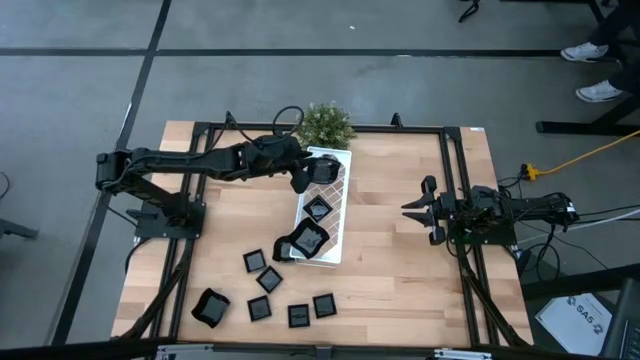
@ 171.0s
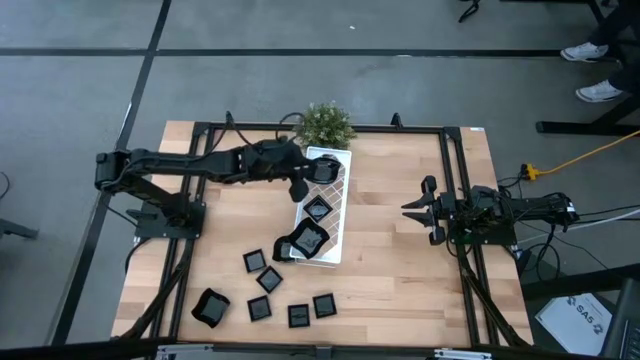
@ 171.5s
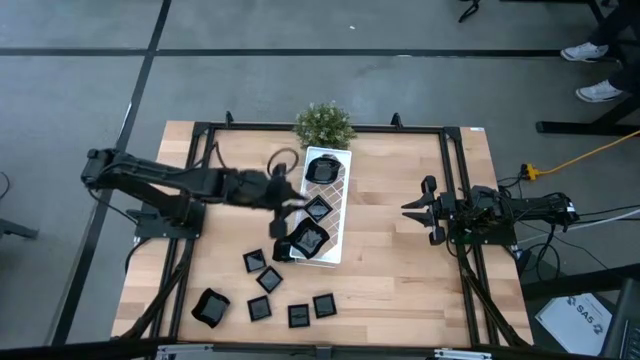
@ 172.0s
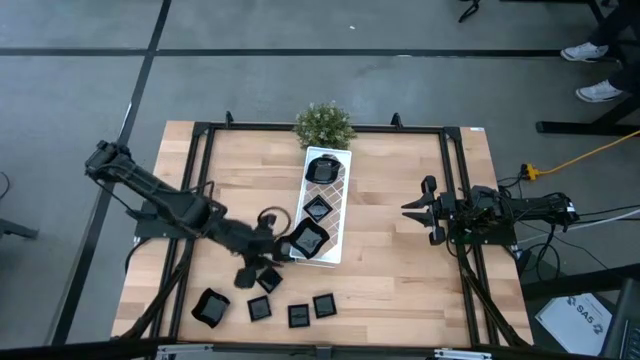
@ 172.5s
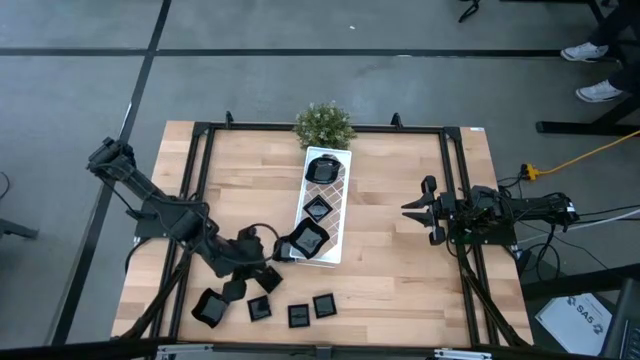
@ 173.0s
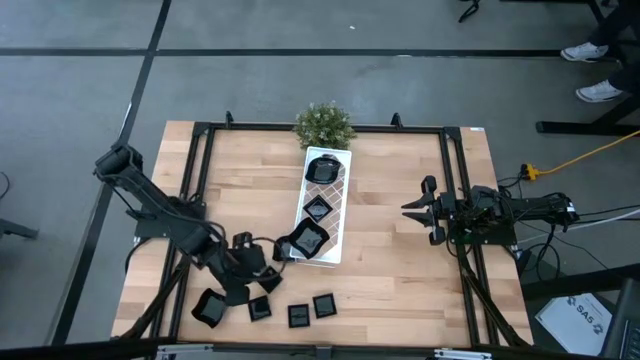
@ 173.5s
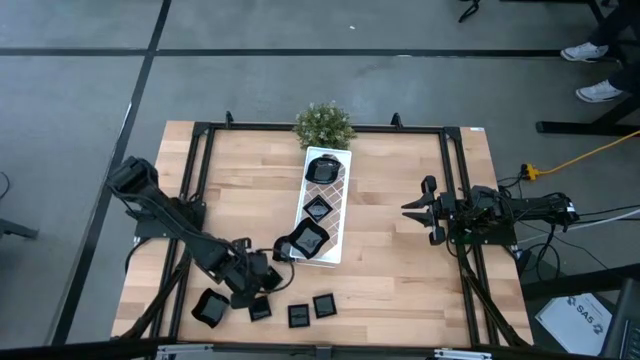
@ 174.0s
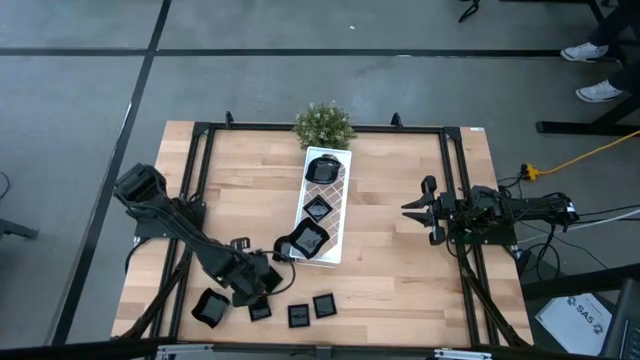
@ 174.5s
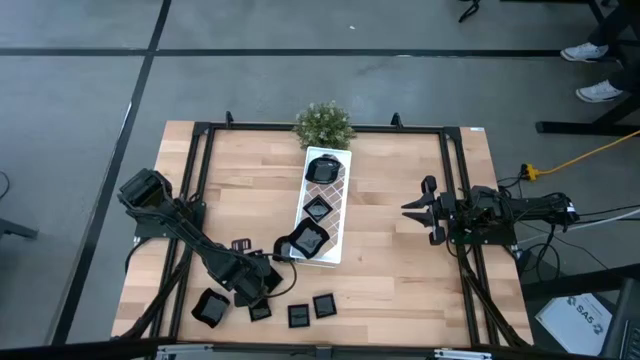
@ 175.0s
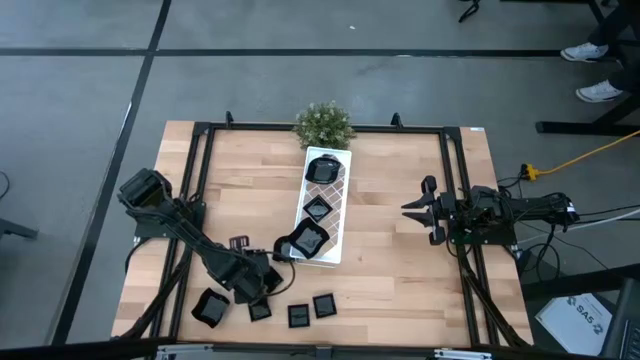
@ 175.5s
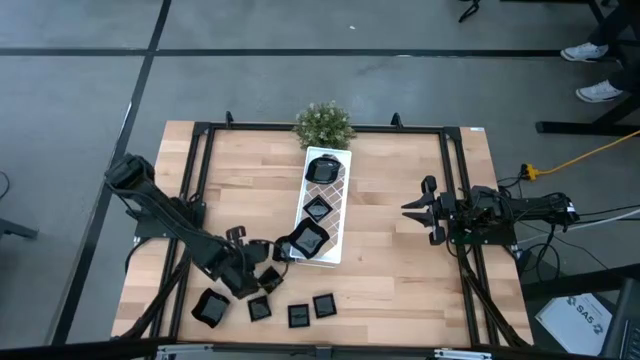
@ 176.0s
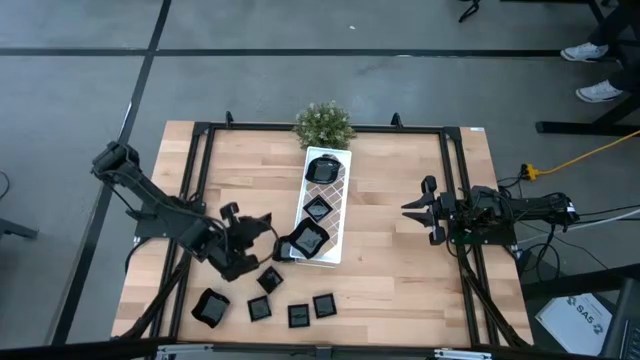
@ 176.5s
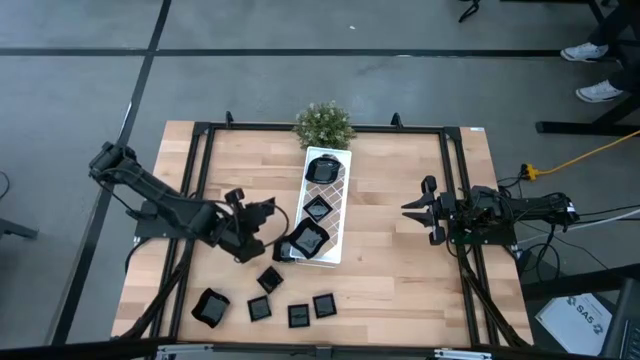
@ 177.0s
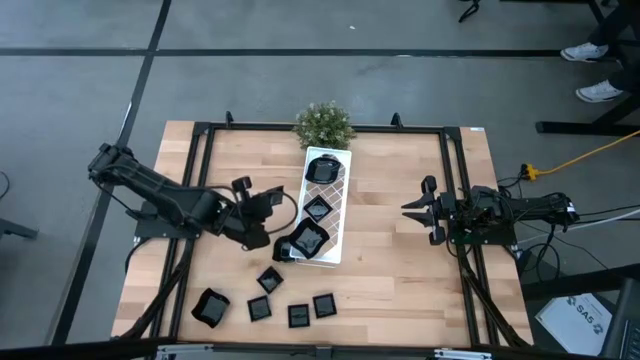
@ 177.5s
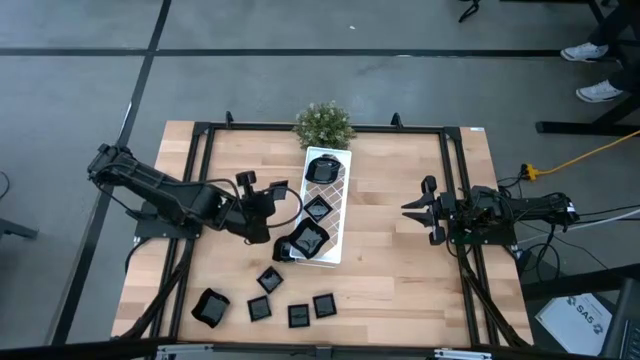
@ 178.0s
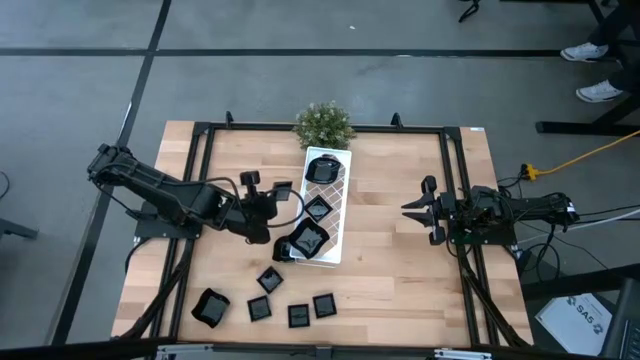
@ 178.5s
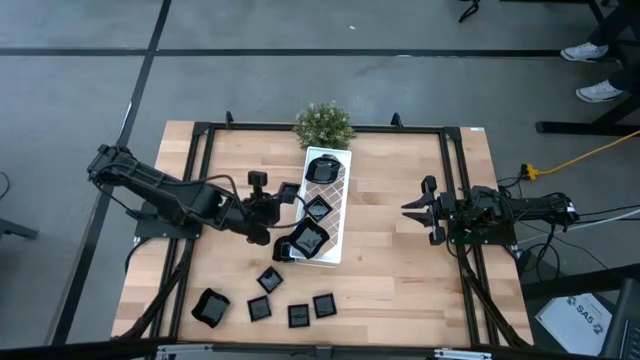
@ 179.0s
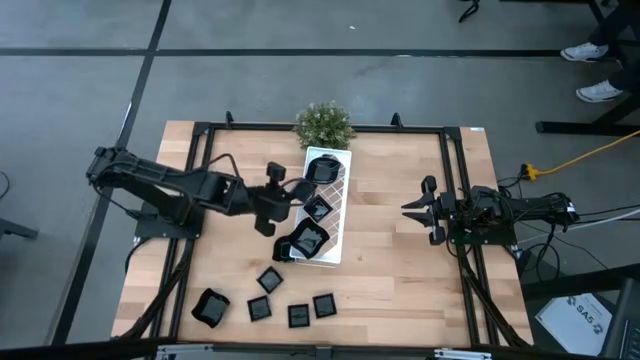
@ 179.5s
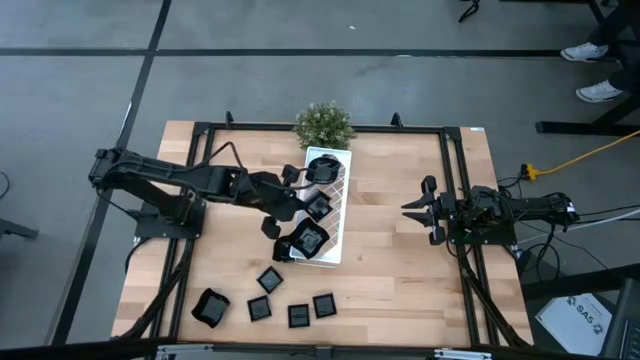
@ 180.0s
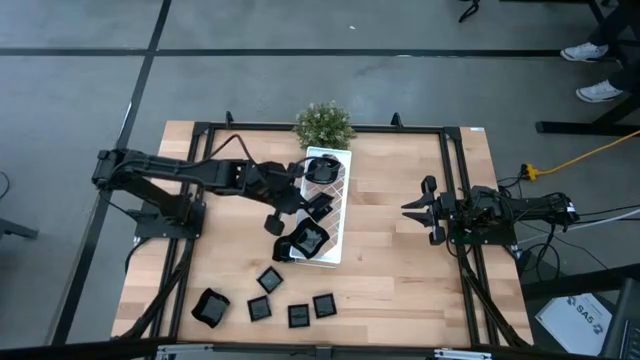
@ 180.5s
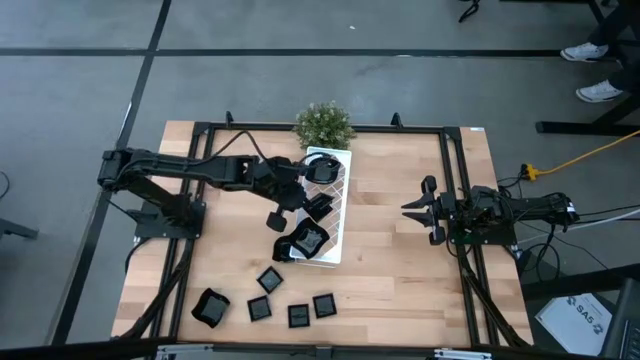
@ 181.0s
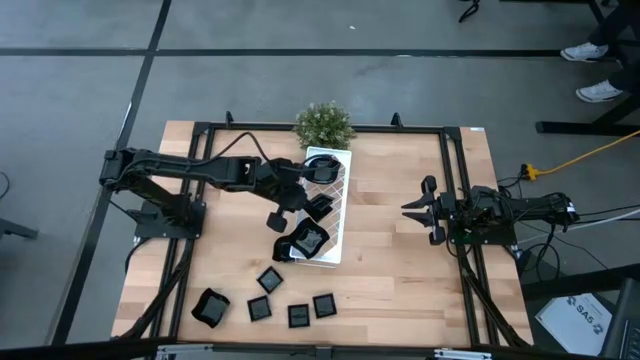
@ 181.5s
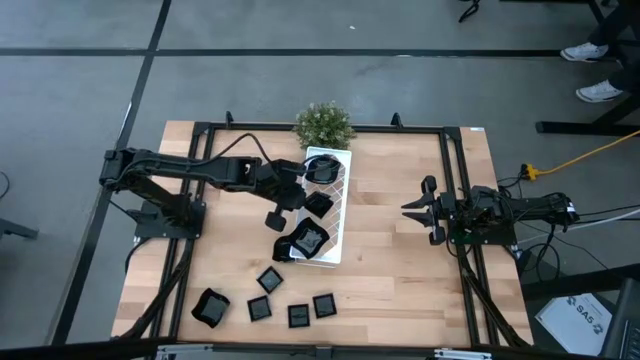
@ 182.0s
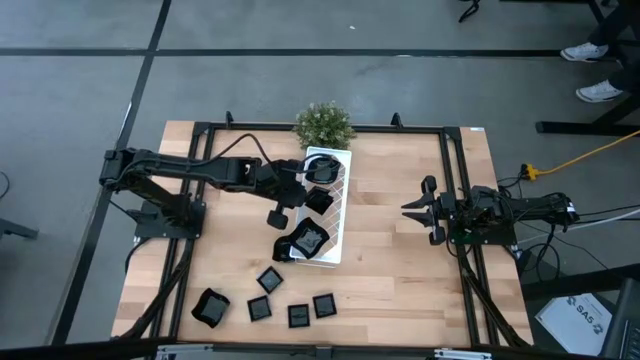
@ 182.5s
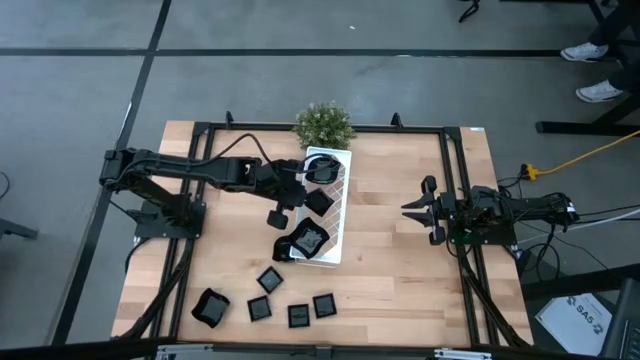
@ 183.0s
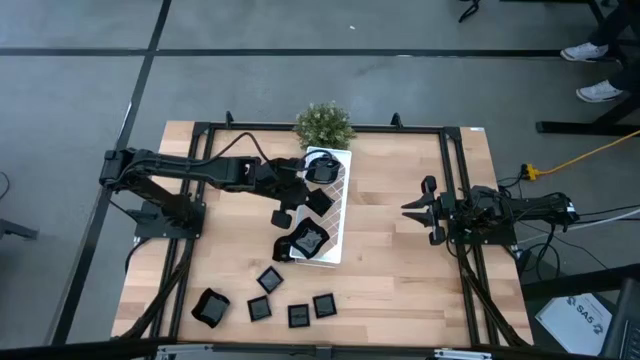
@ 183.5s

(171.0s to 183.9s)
Task: Pick & Place Mini shaped plates
Stack the square plate on top of the square plate on the shelf

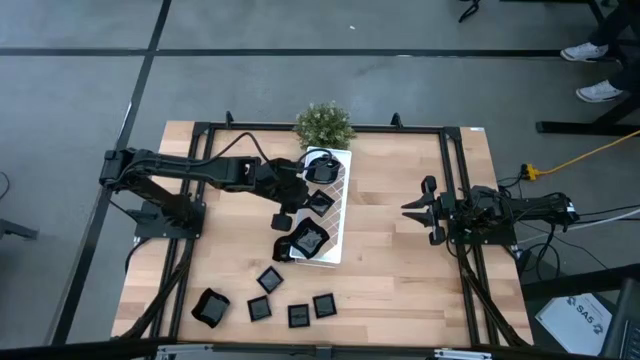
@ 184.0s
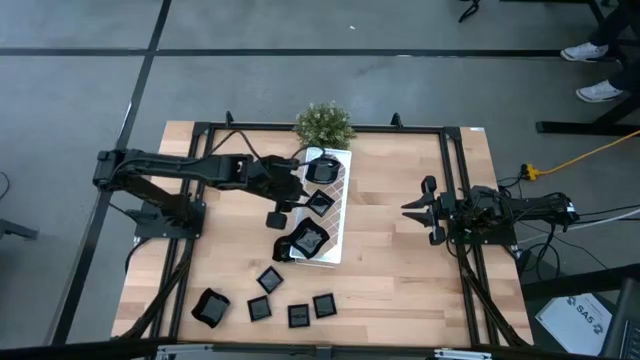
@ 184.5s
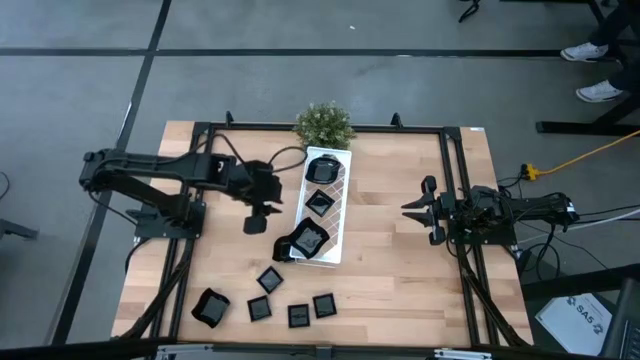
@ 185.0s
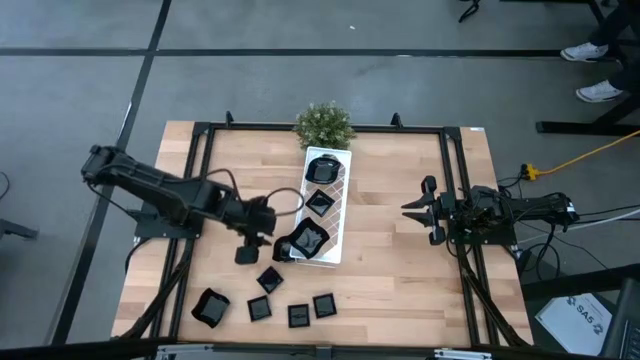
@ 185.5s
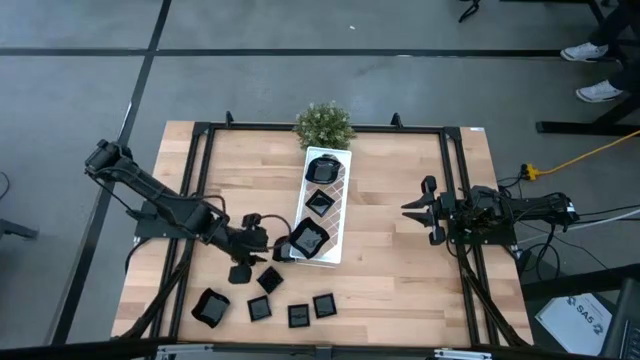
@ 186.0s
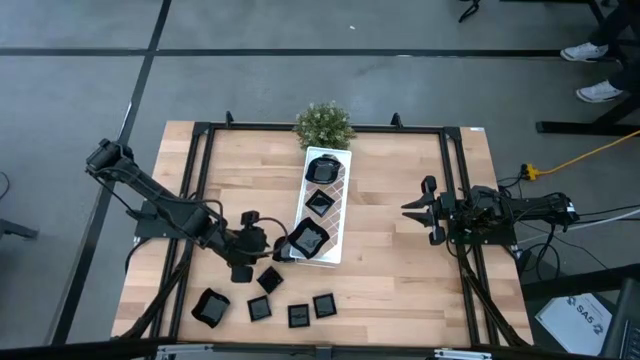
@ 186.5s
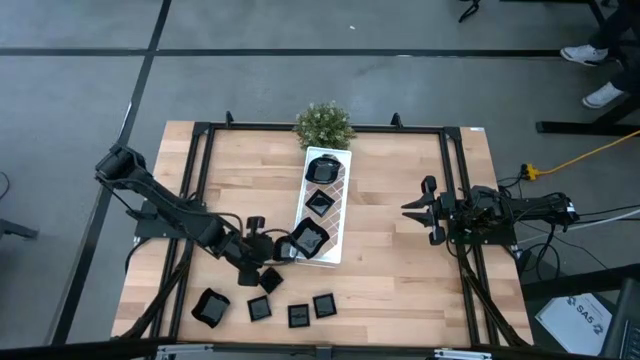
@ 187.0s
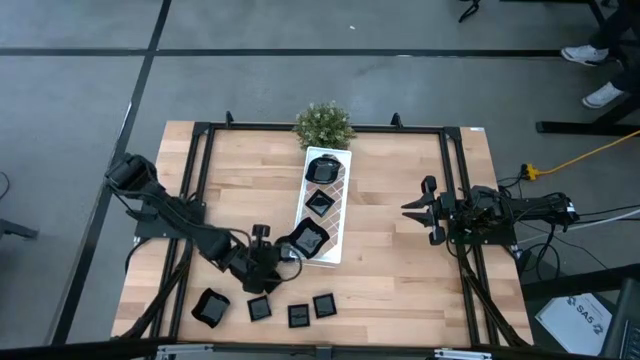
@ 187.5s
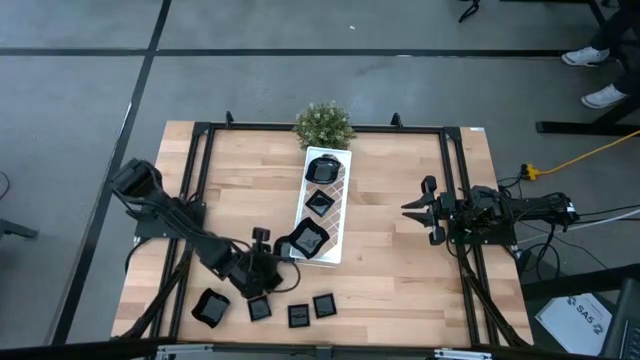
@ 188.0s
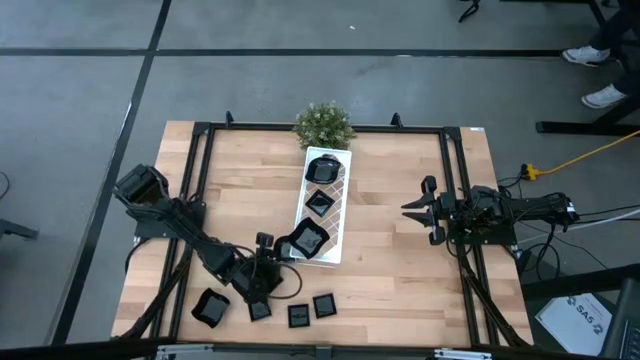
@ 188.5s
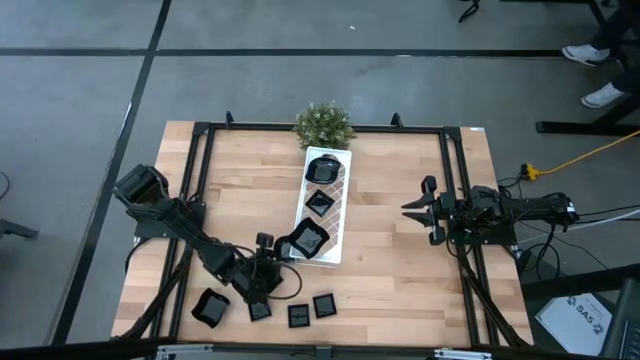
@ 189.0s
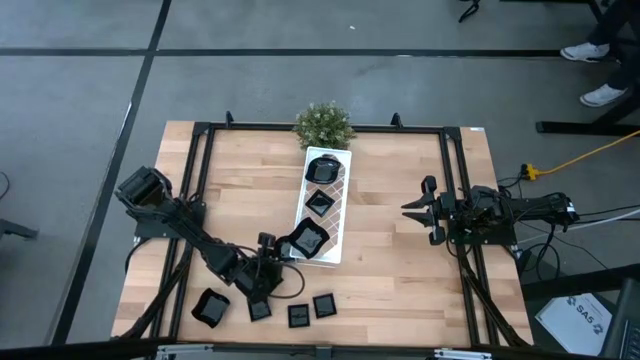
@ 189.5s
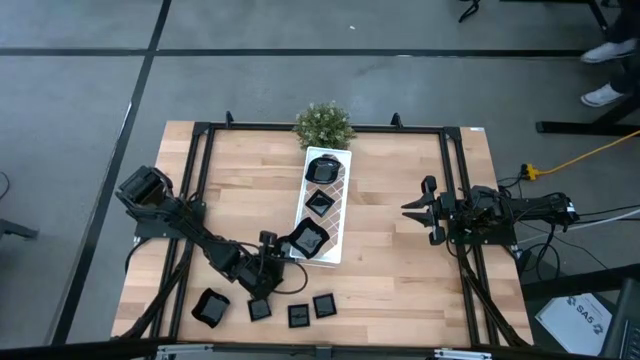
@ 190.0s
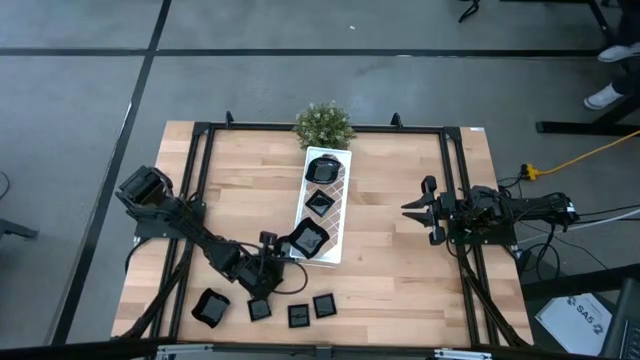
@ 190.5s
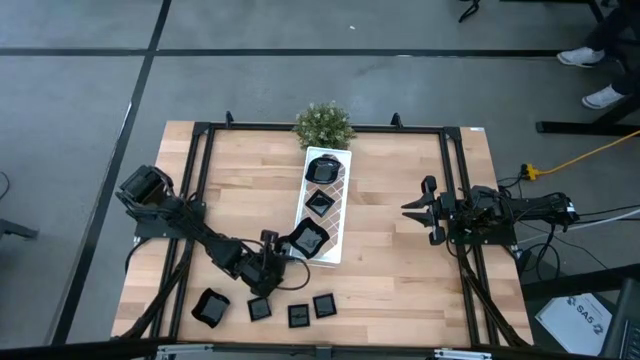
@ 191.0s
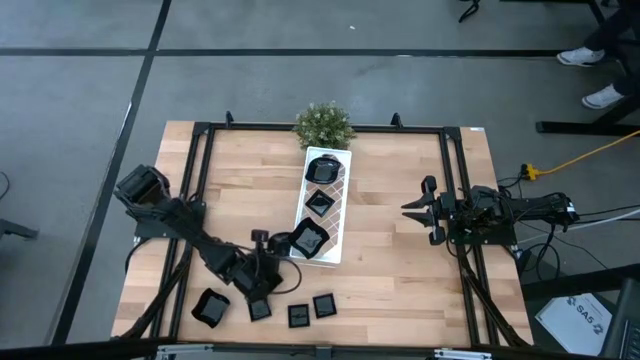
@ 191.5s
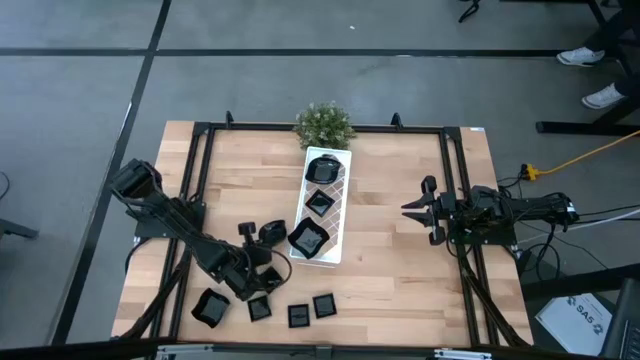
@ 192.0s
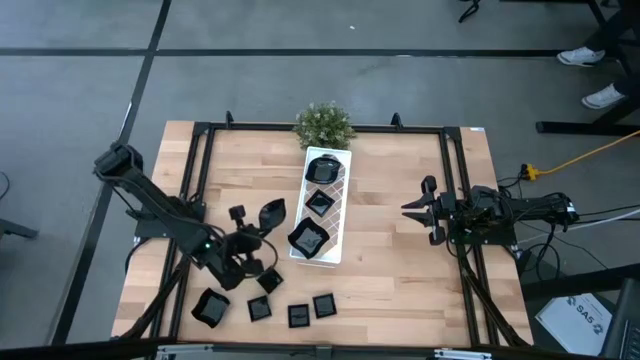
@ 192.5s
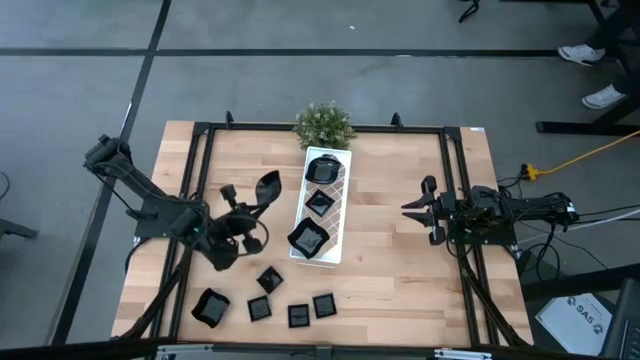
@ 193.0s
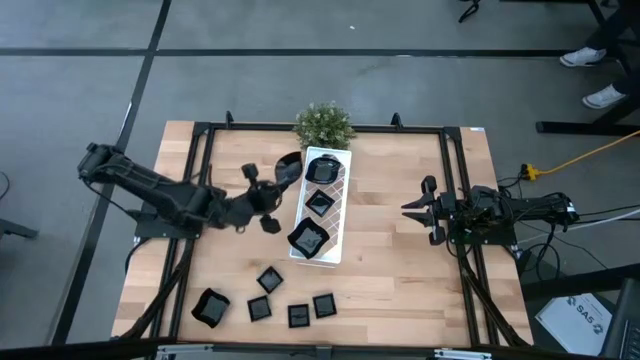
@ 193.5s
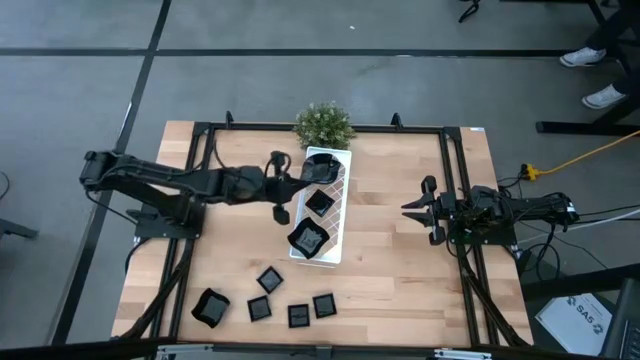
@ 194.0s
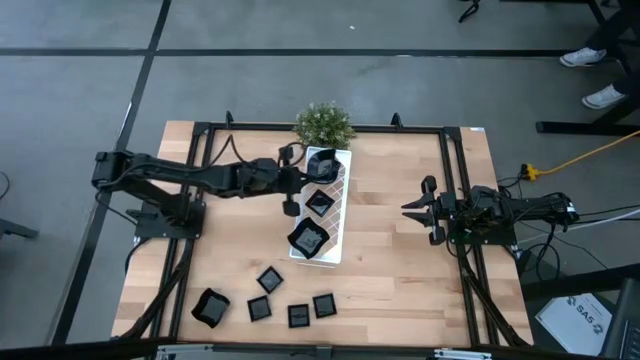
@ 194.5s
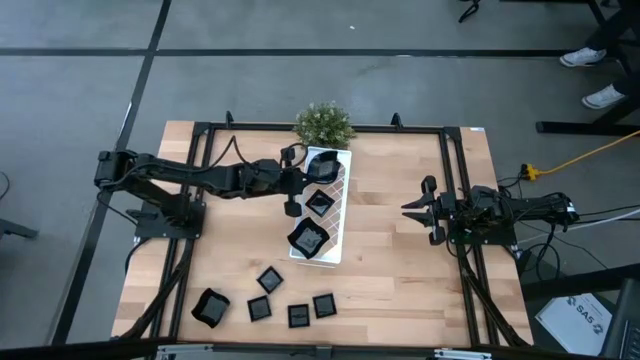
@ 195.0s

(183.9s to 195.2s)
Stack the leaf shaped plate on top of the leaf shaped plate on the shelf
